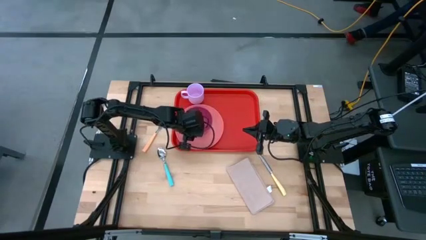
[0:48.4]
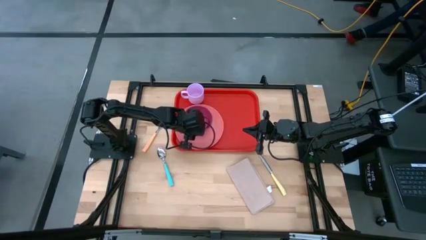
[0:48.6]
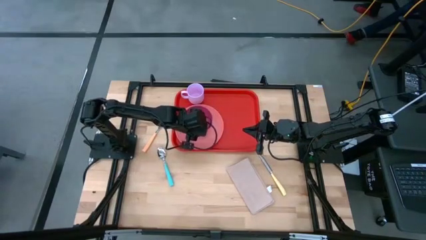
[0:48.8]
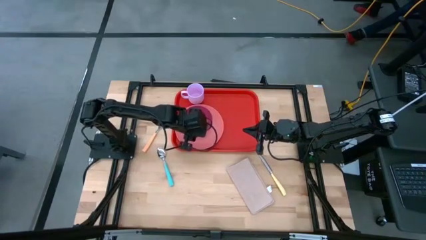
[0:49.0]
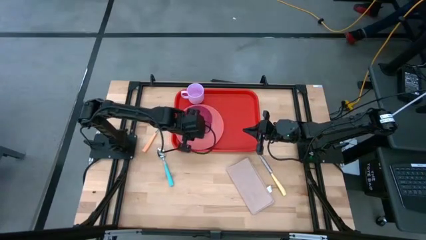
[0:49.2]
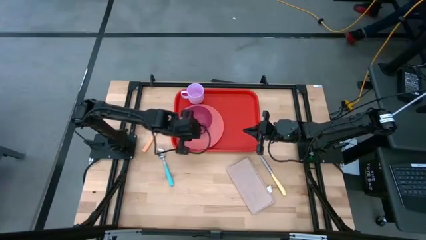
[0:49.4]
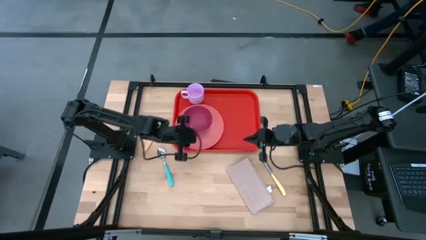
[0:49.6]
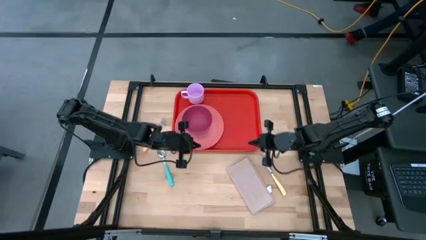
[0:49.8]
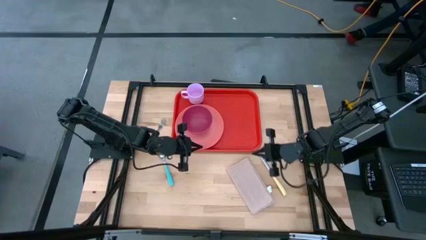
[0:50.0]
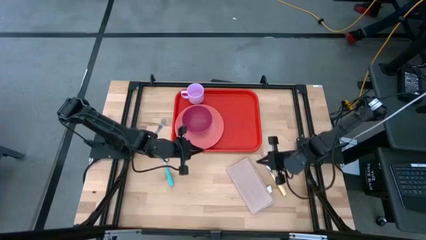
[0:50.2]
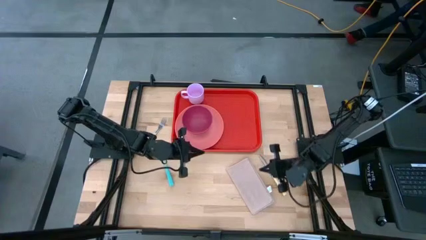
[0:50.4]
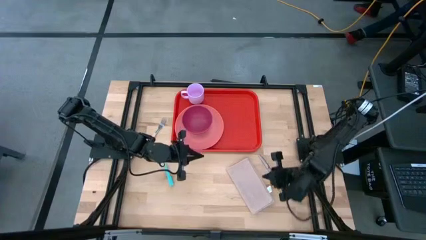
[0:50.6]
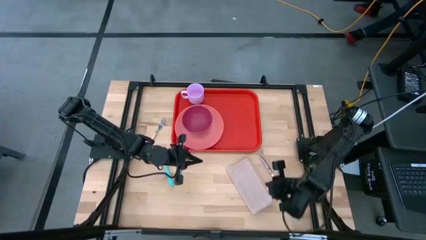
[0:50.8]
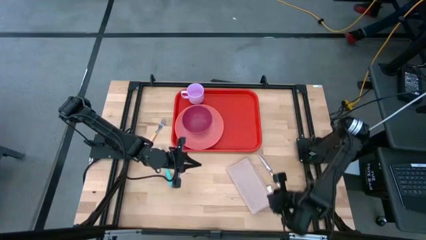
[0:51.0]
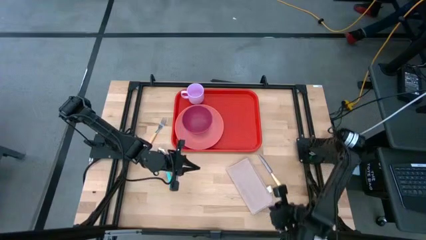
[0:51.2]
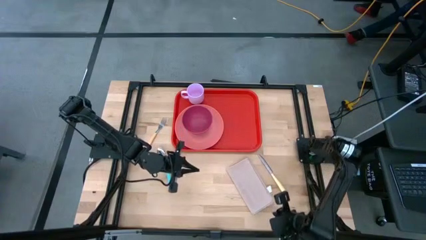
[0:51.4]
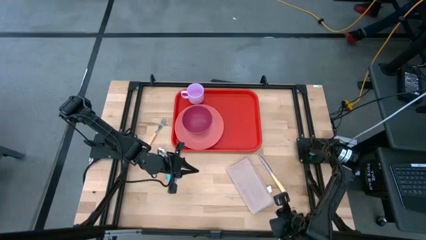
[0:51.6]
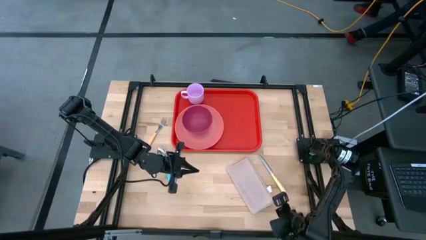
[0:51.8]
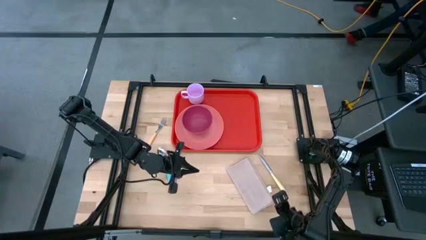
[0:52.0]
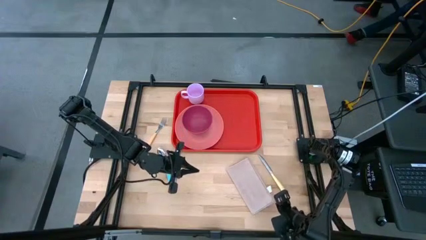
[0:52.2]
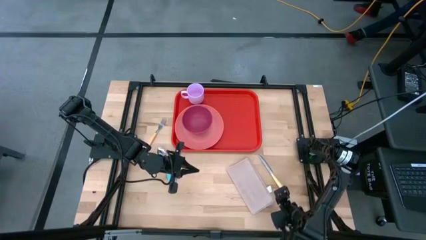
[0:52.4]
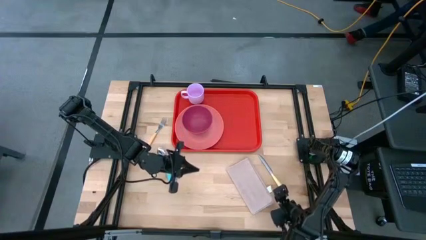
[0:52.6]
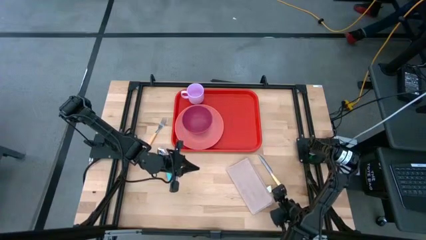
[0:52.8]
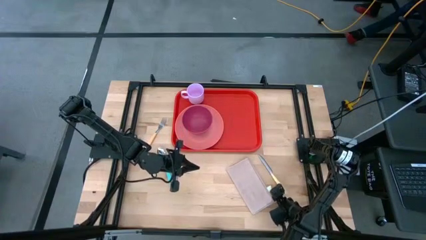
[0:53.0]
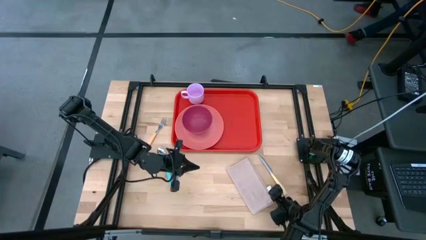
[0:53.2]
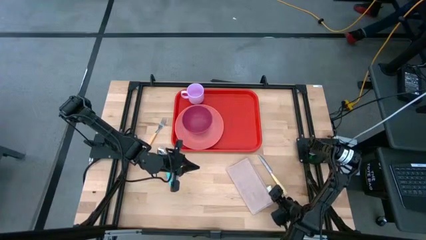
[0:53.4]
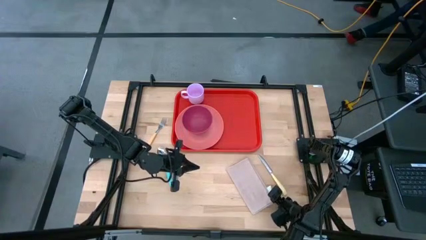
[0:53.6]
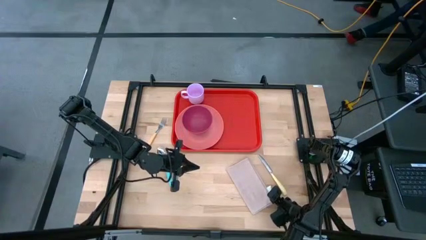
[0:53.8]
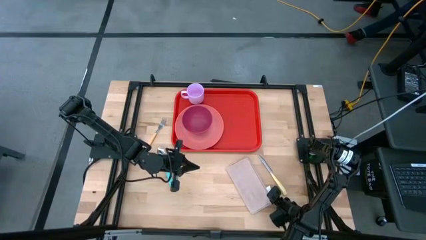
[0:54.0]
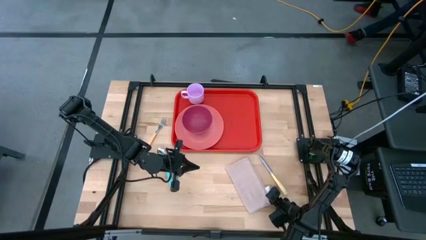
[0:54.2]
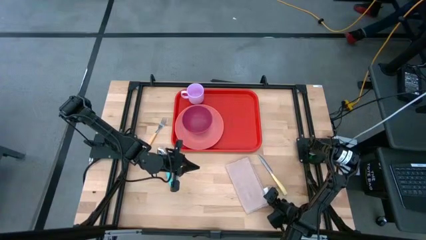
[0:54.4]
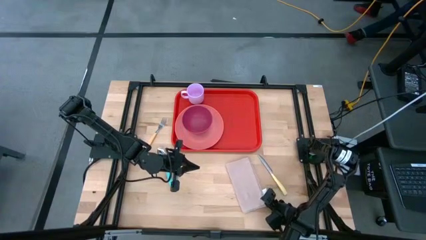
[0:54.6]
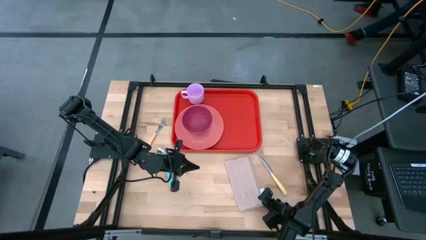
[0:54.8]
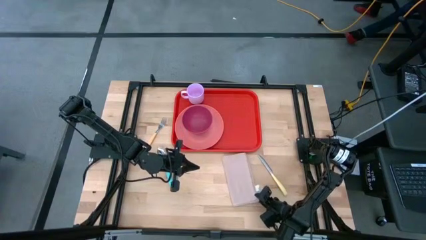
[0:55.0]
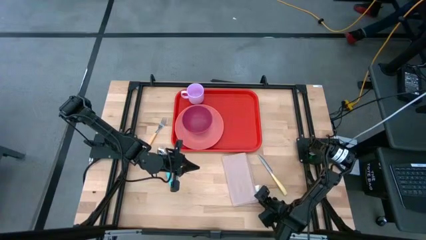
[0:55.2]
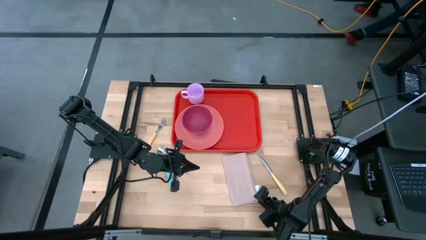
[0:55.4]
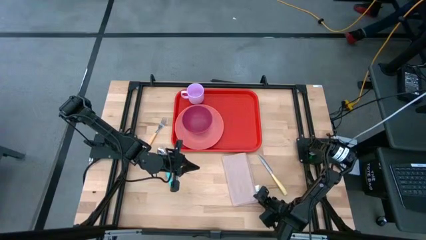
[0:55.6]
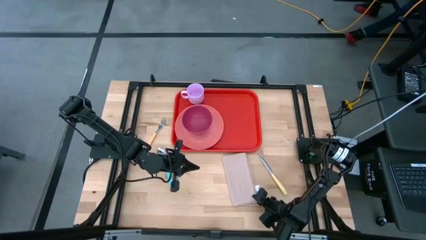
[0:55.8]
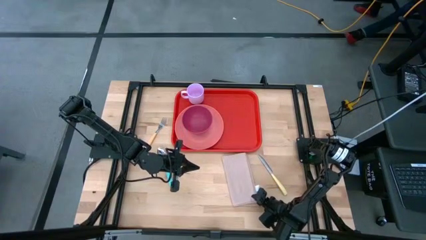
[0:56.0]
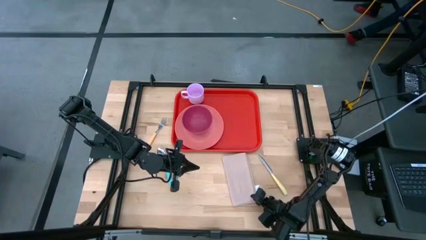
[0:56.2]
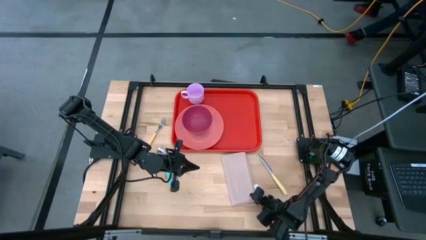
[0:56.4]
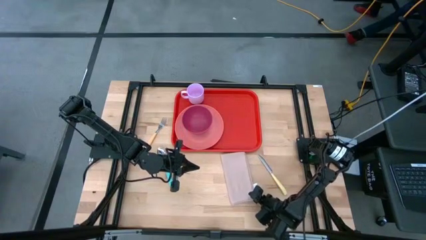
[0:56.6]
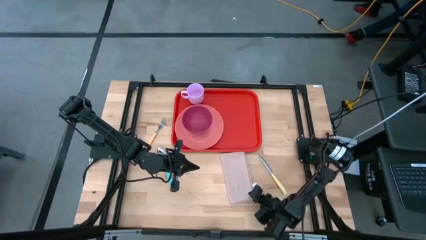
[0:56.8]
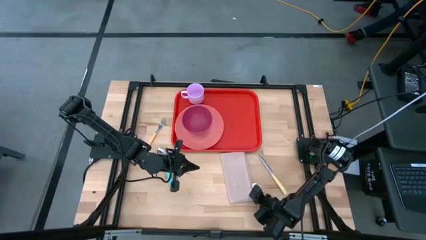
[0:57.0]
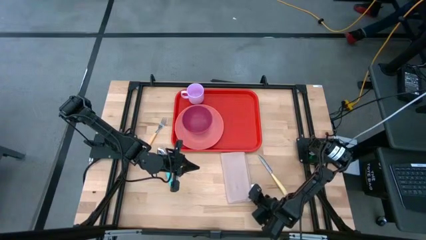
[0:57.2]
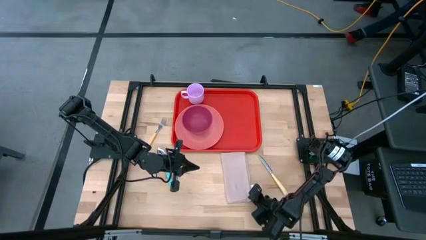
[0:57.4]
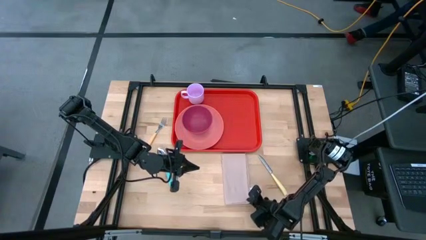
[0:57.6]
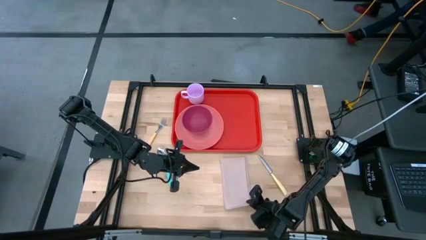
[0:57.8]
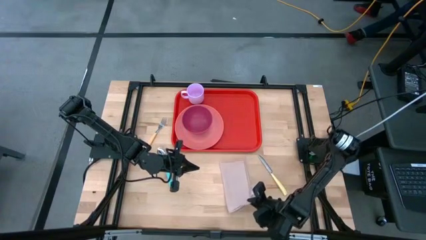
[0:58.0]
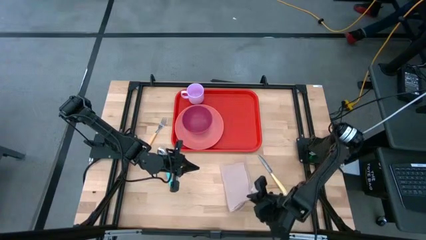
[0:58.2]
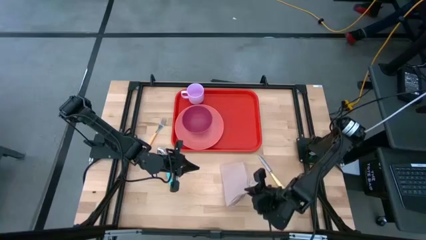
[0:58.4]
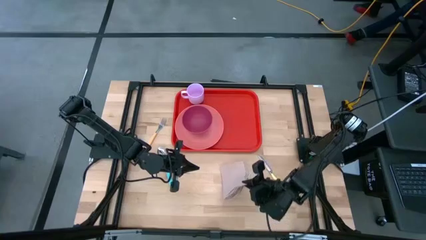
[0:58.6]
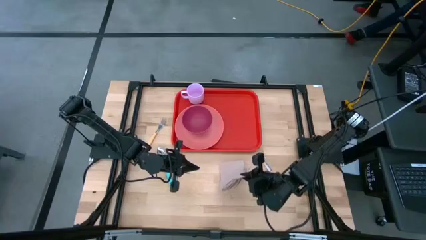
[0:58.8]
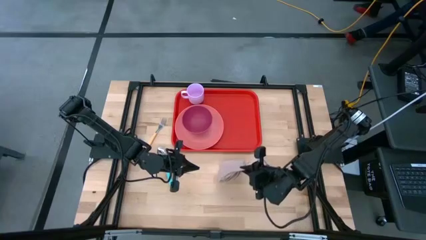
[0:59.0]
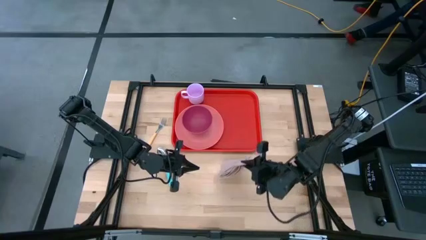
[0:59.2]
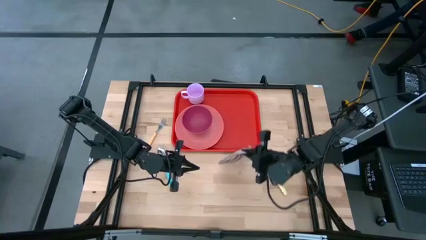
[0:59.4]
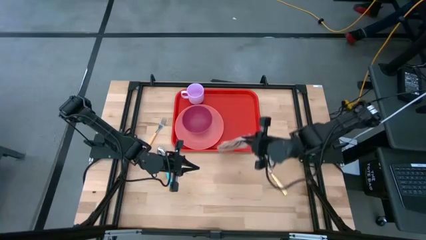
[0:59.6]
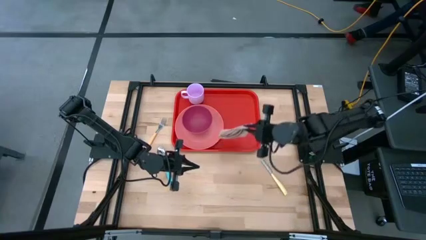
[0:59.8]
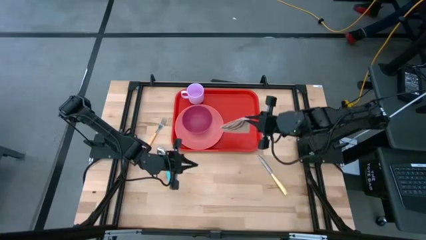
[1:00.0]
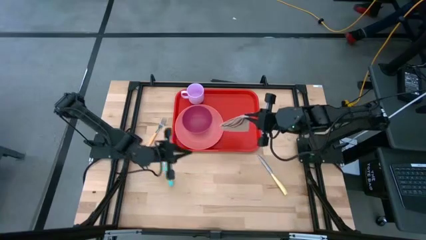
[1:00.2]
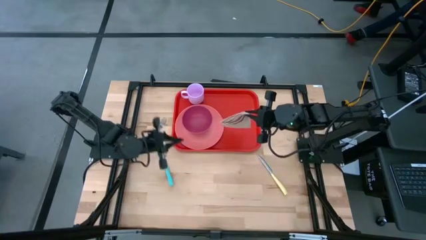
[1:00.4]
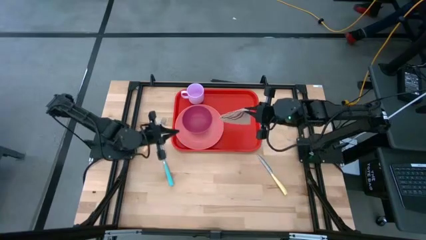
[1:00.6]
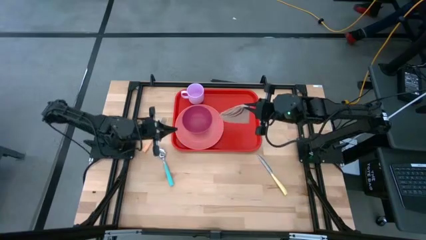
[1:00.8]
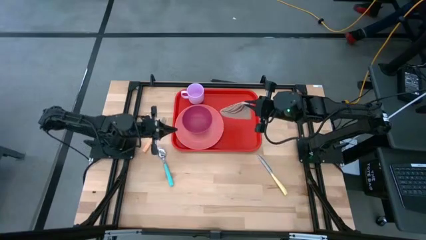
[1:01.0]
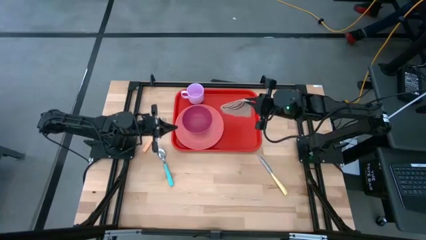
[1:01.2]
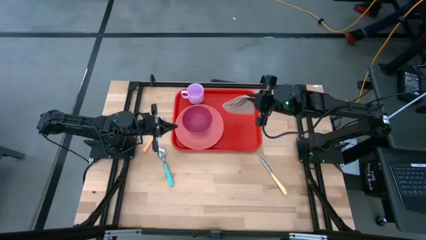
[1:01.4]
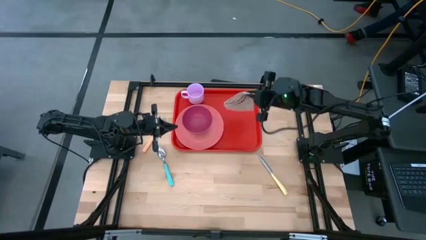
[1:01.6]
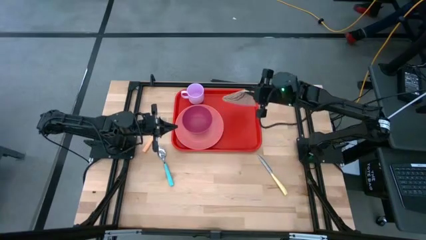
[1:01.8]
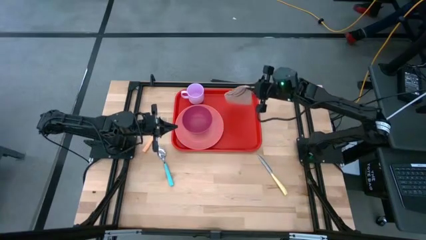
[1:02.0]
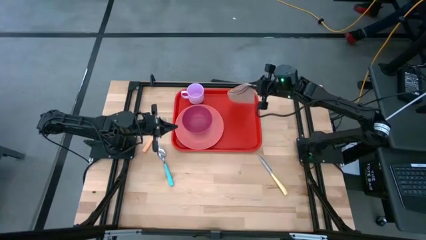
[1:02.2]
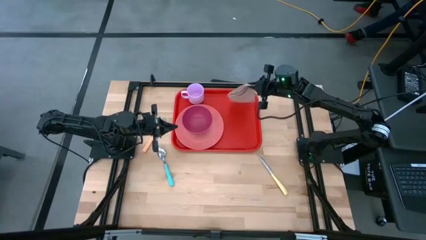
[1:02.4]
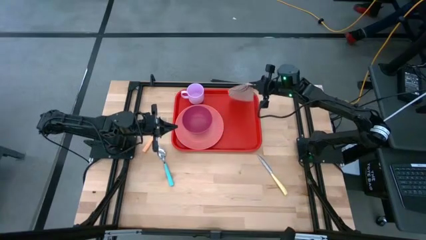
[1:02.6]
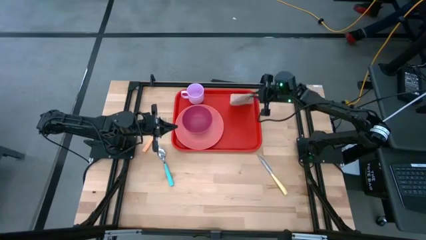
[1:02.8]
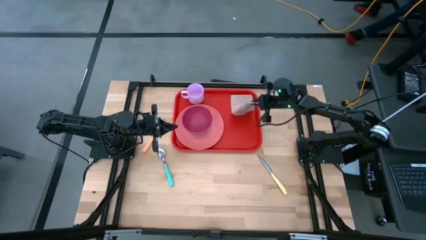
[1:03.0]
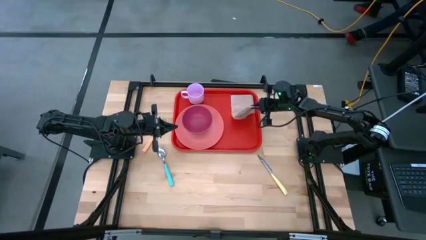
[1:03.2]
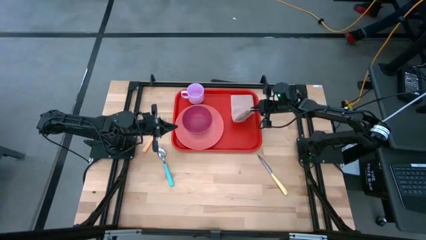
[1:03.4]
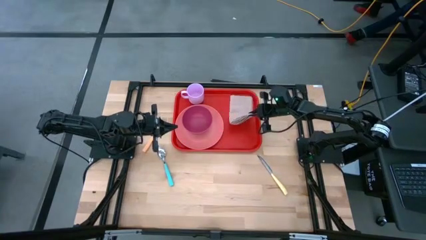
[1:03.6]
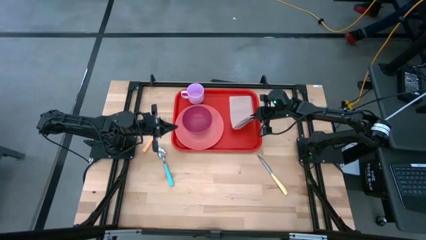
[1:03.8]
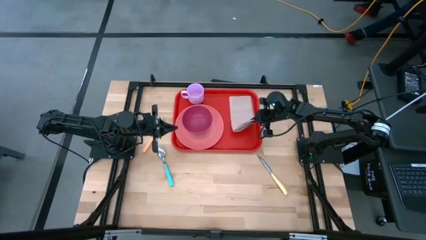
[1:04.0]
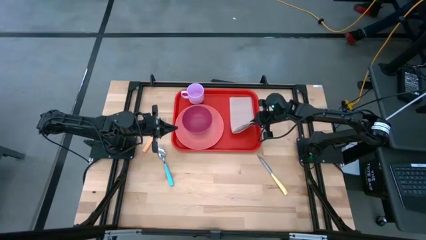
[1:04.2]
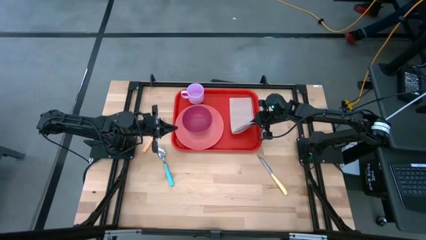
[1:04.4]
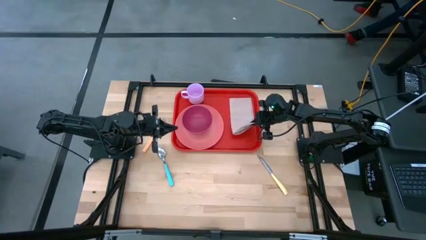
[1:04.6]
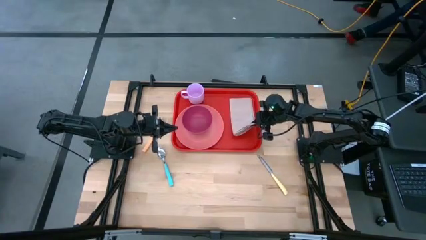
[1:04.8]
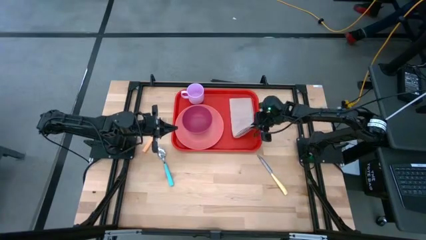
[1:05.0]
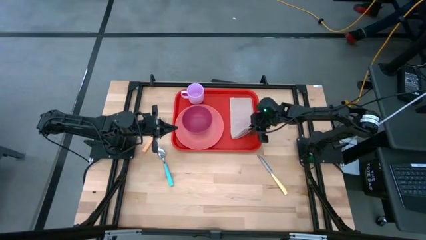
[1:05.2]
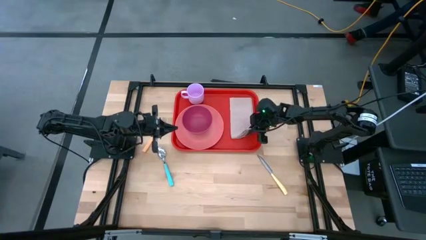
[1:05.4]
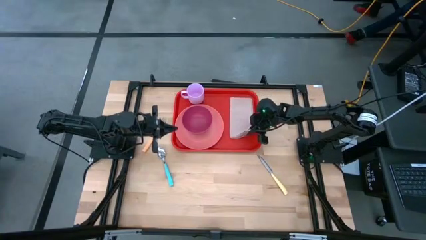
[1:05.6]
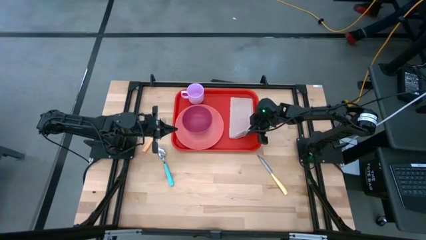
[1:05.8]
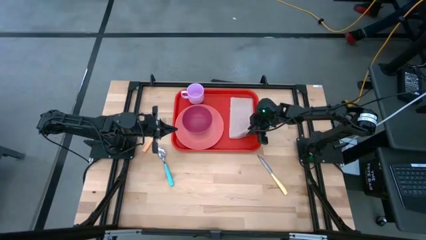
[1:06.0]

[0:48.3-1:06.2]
Task: Set up tray
Put the brown napkin on the red tray
